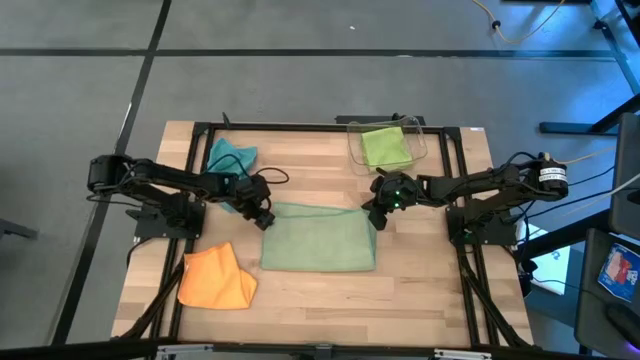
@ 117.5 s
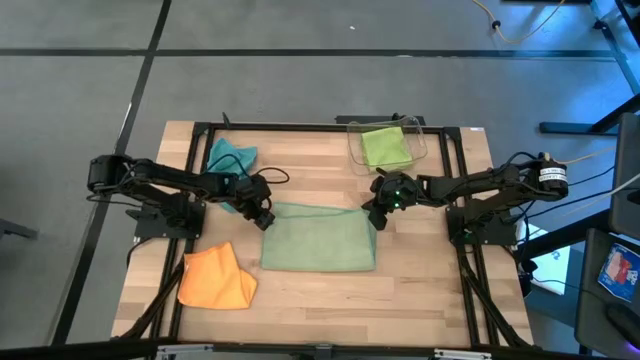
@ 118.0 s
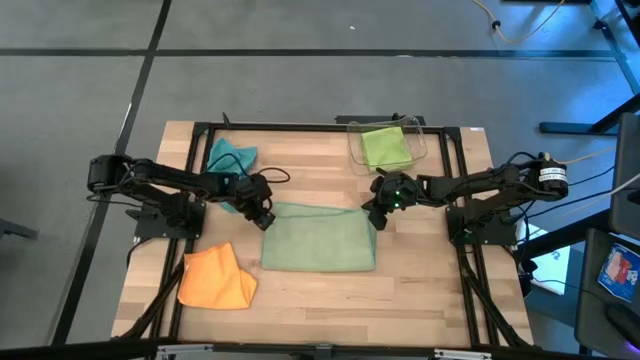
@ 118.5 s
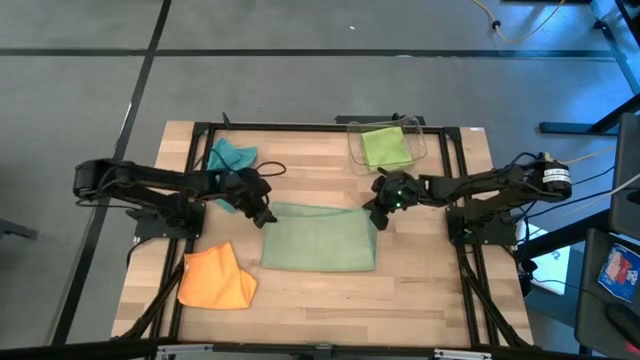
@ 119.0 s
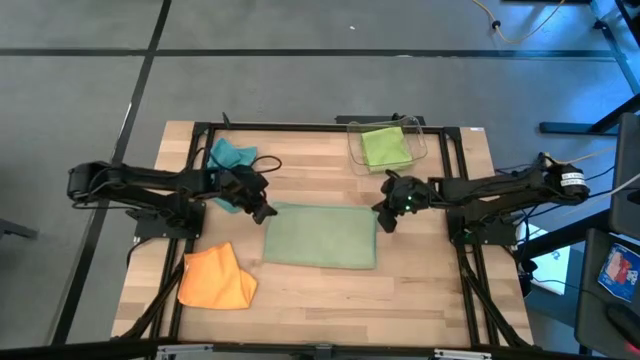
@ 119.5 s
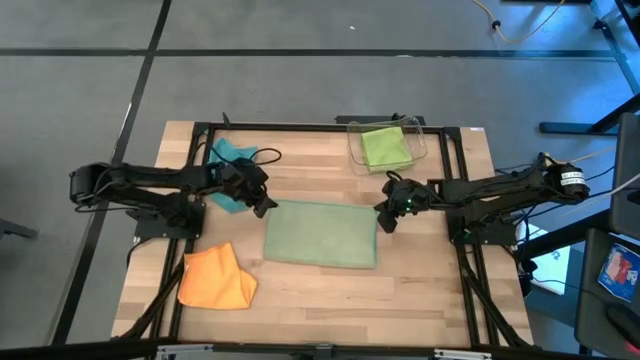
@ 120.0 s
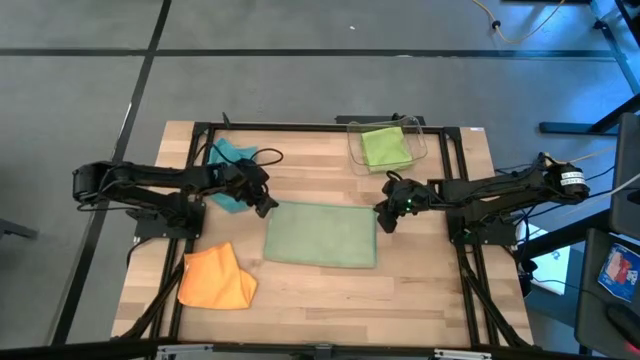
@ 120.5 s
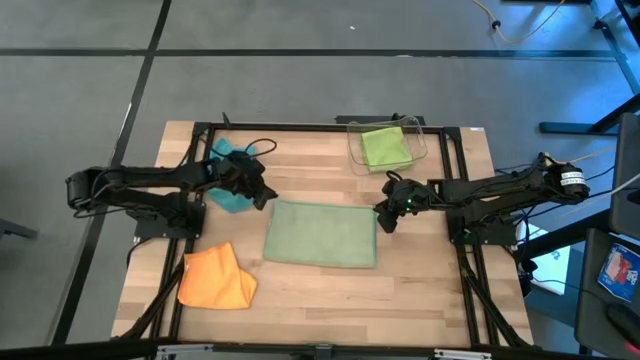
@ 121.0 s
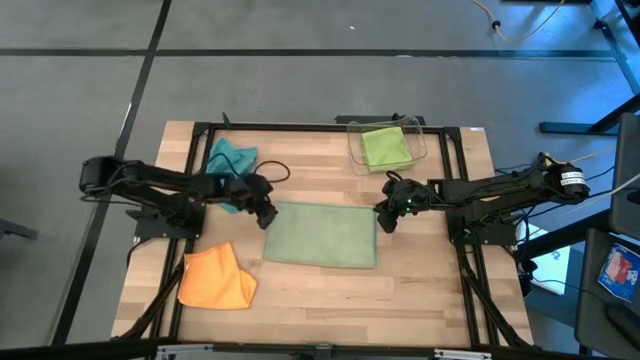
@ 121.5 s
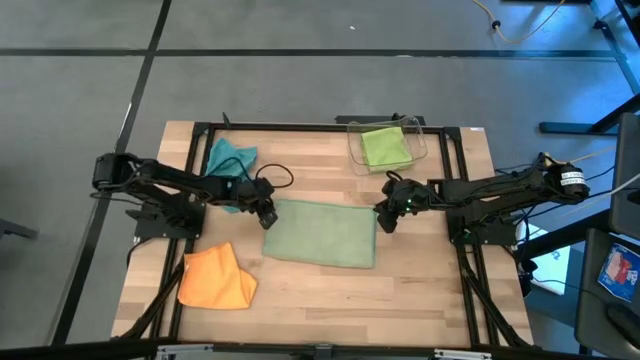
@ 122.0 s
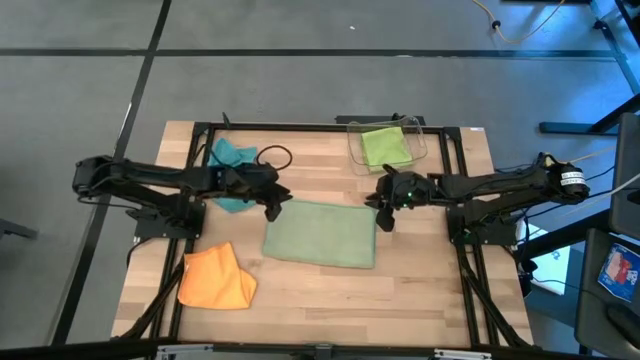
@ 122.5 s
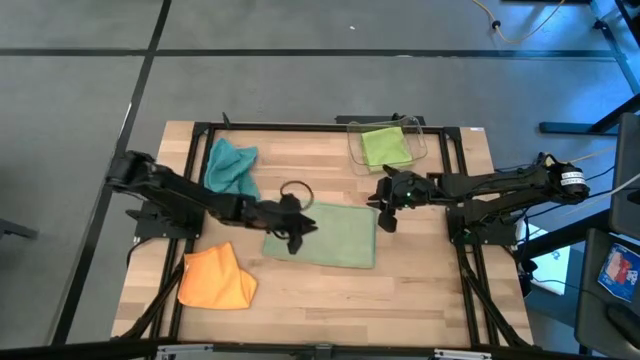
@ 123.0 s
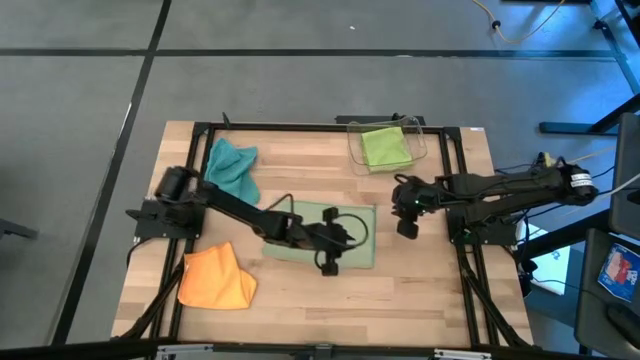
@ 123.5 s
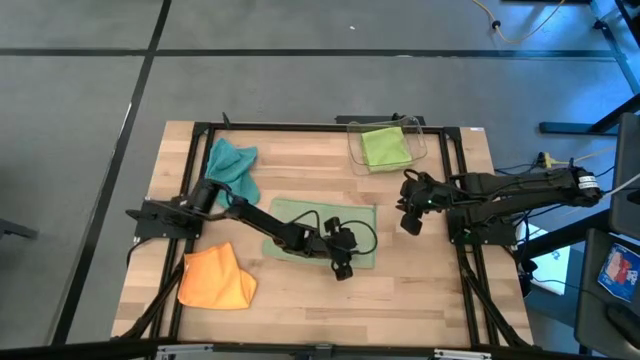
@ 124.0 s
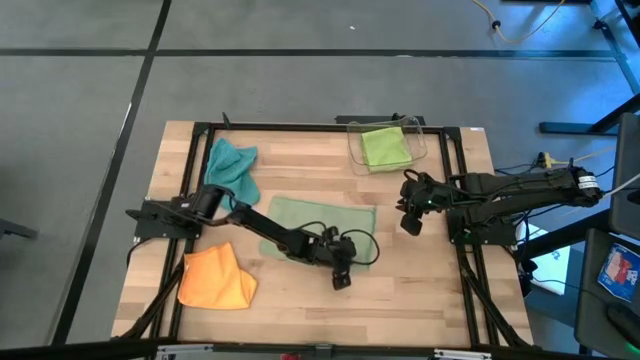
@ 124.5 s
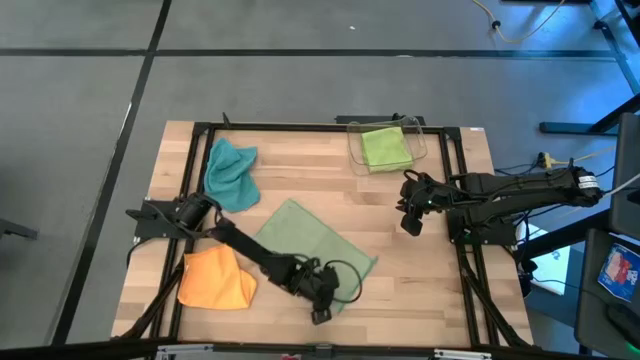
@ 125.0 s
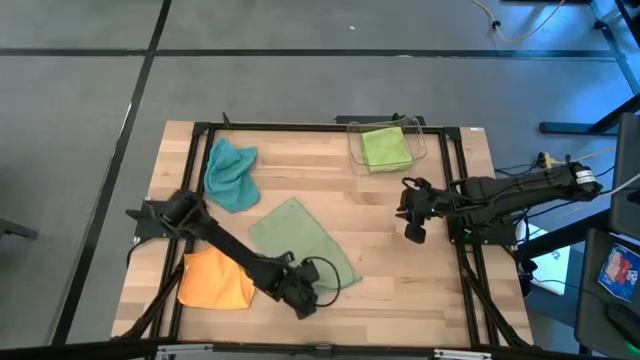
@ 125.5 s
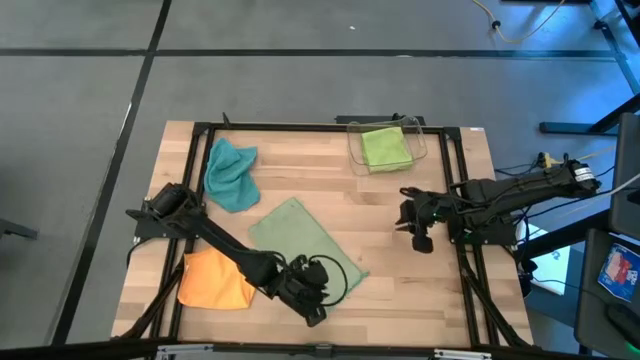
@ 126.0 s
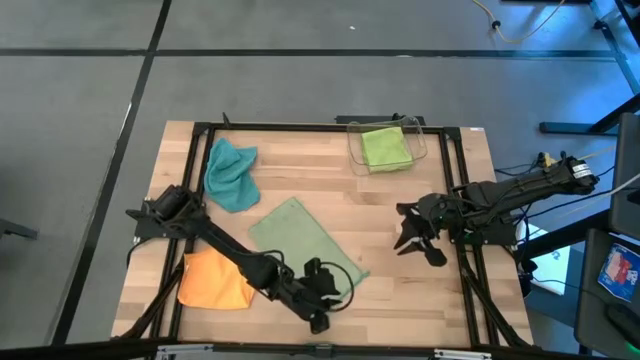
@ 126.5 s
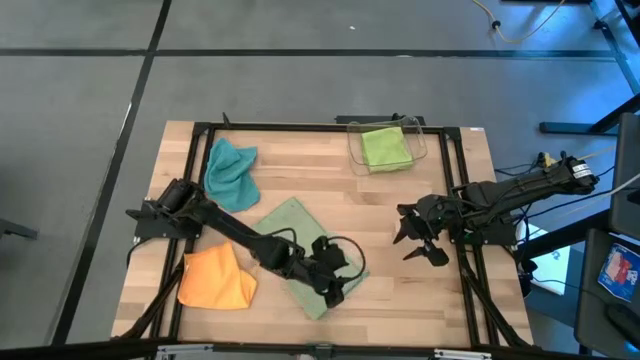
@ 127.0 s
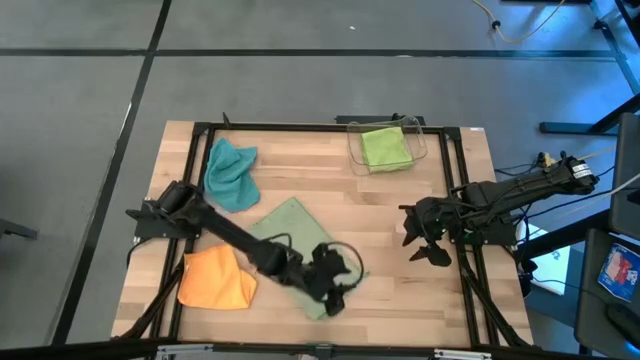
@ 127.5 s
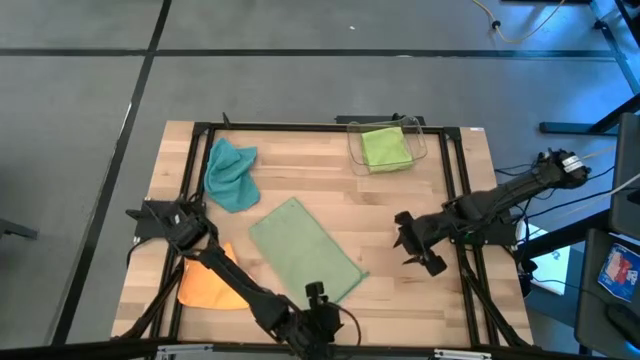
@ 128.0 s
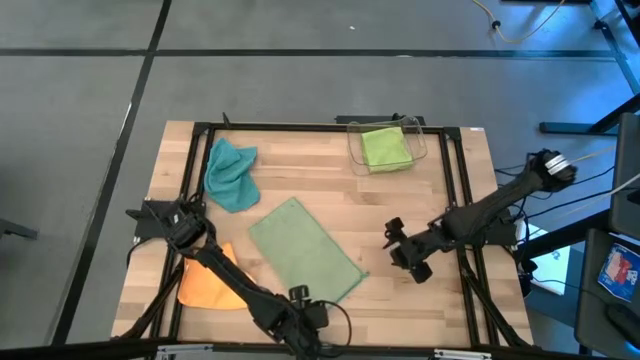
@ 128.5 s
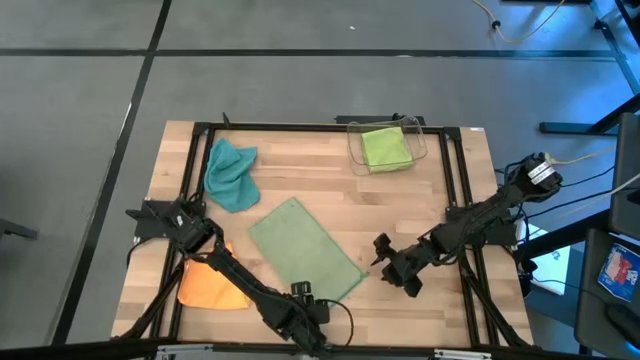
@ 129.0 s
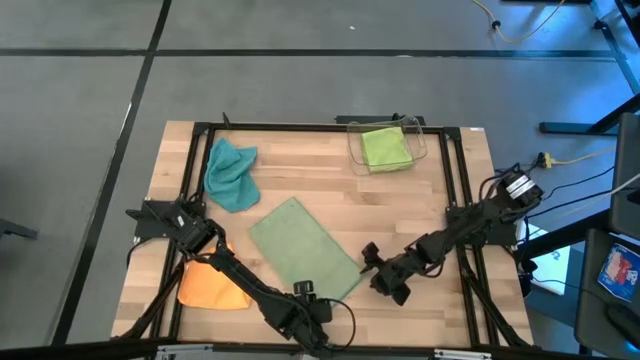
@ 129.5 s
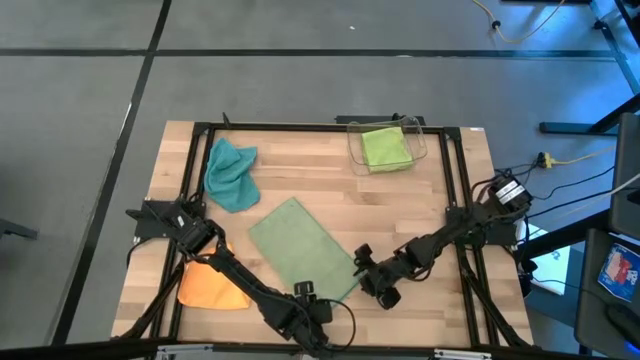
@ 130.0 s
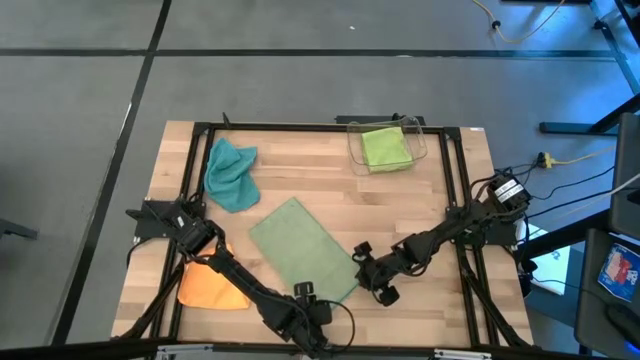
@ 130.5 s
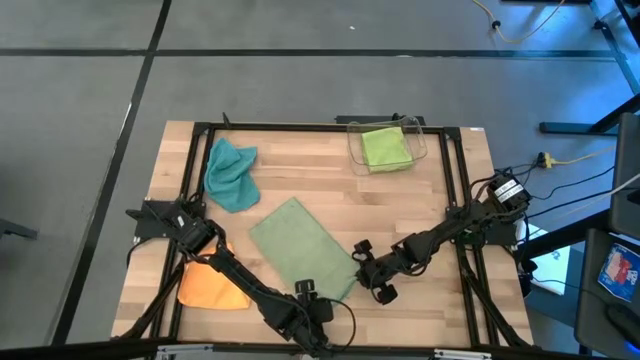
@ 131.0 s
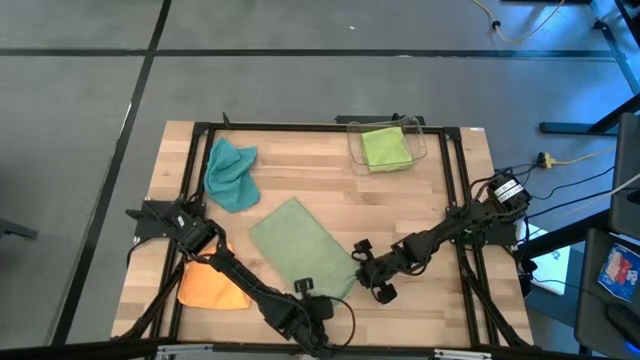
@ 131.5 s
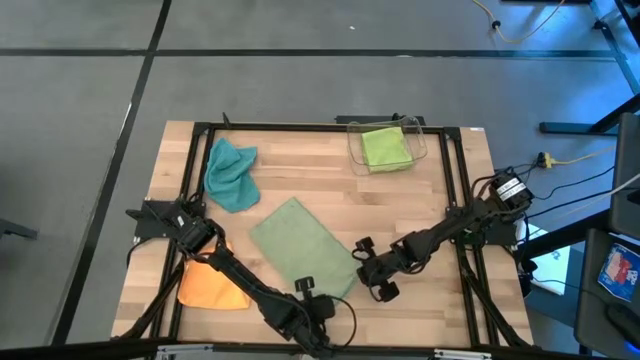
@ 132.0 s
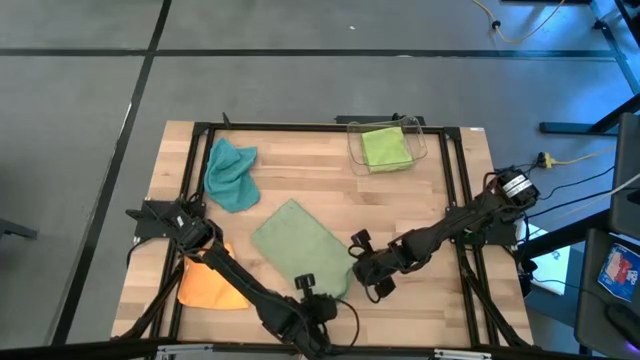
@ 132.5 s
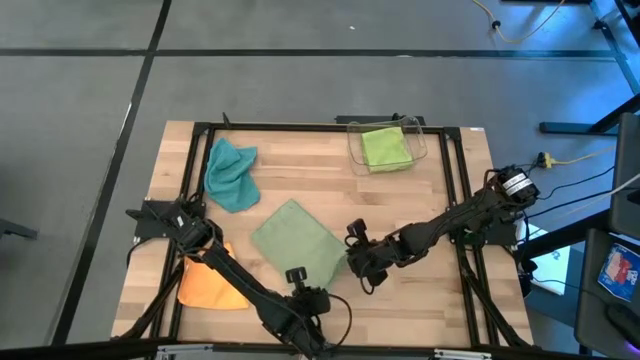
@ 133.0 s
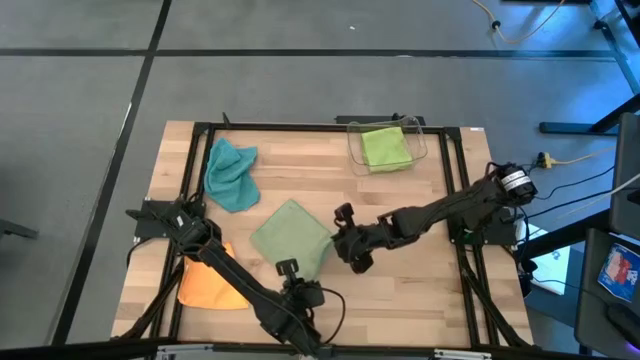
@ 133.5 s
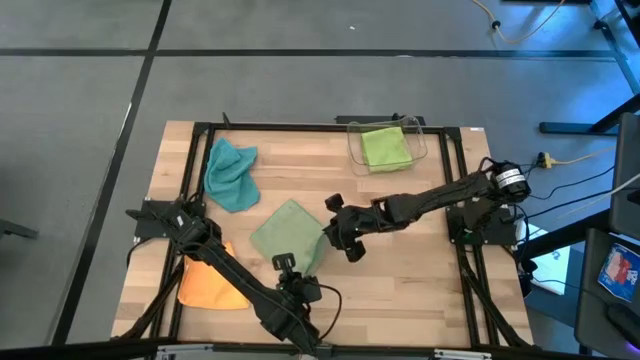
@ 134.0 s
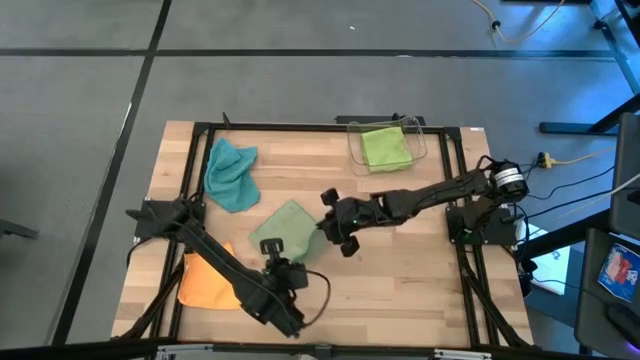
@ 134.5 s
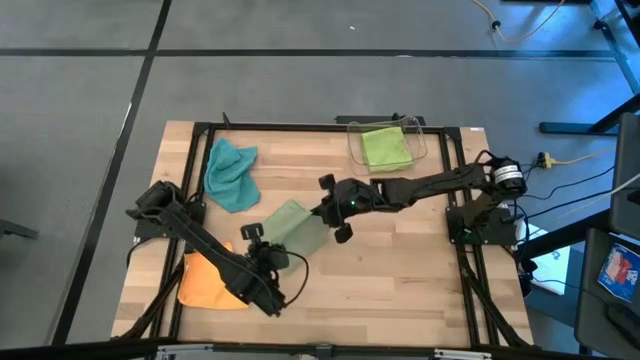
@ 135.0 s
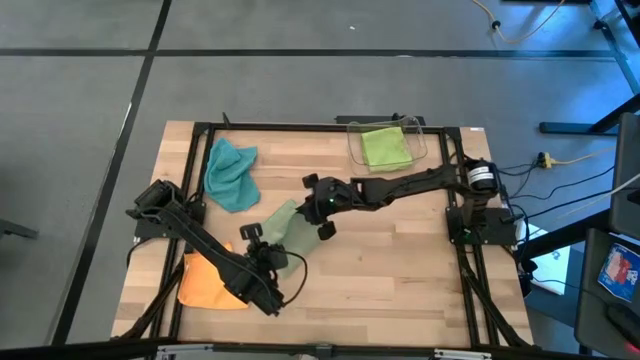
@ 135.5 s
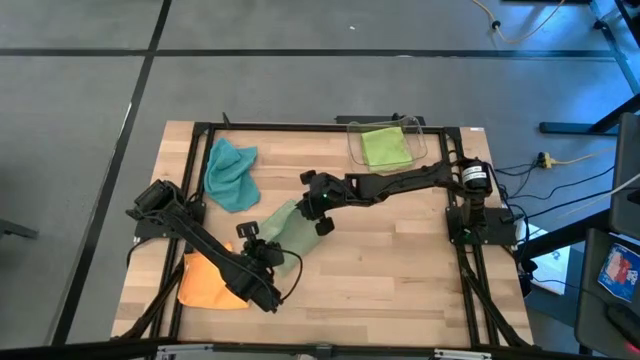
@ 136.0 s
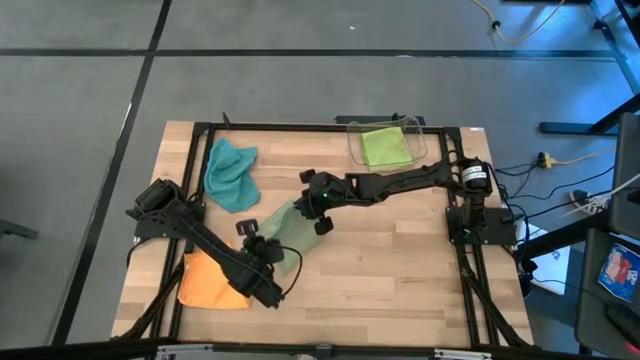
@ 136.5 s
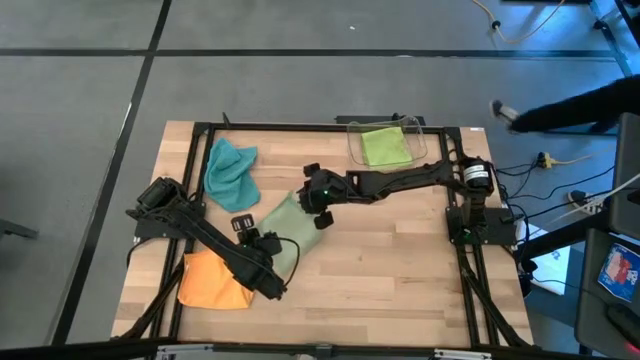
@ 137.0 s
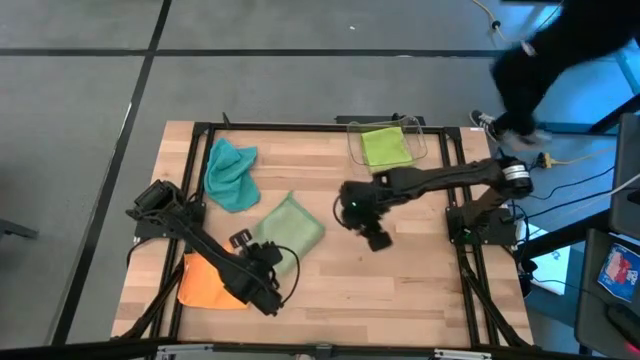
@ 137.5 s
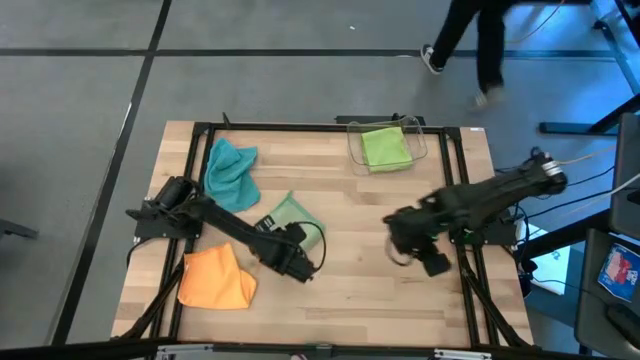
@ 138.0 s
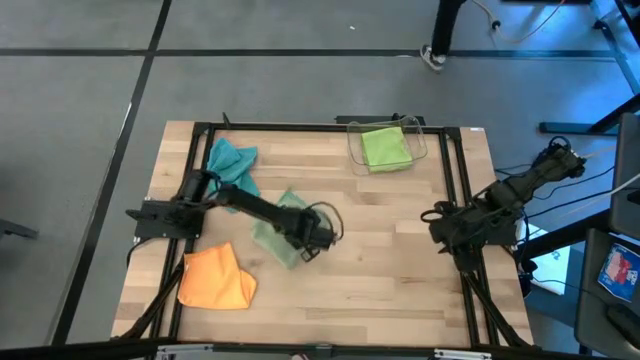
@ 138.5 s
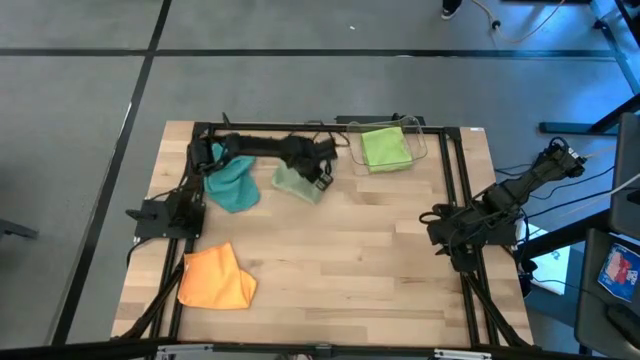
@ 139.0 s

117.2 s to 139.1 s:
Task: Fold microfiber towels
Fold the green microfiber towel

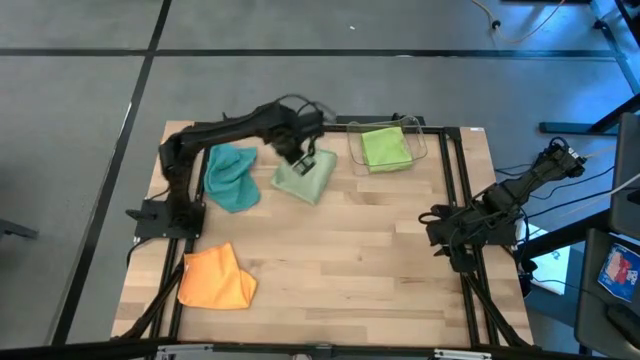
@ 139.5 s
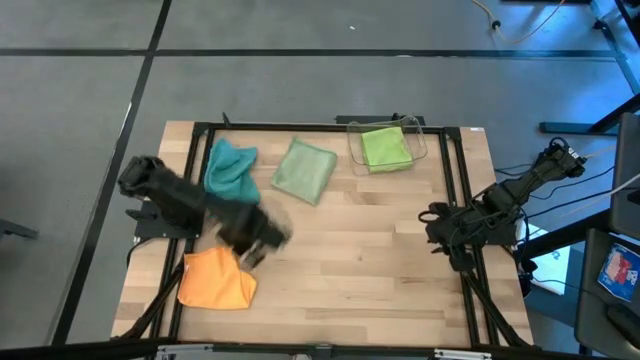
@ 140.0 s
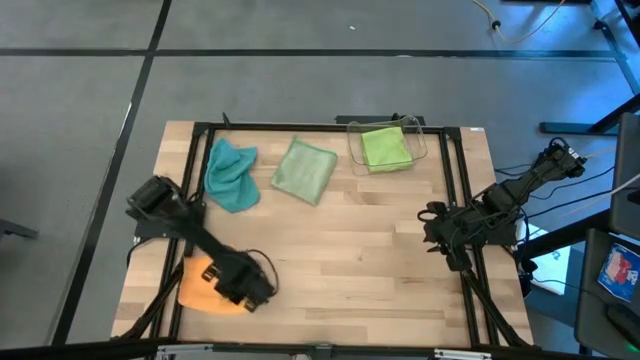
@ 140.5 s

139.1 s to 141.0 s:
Move the orange microfiber towel
